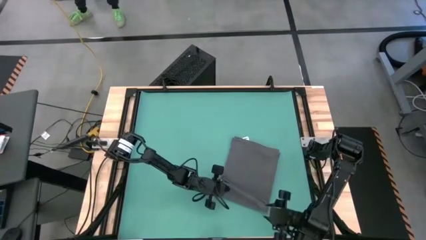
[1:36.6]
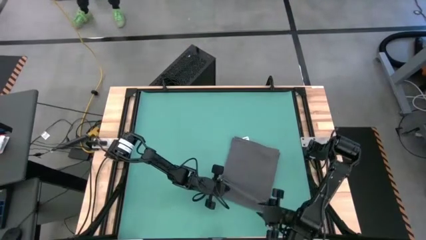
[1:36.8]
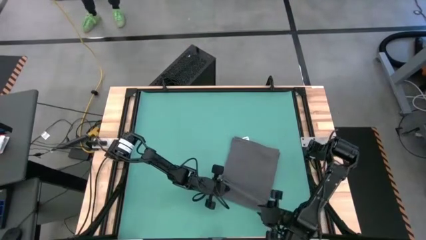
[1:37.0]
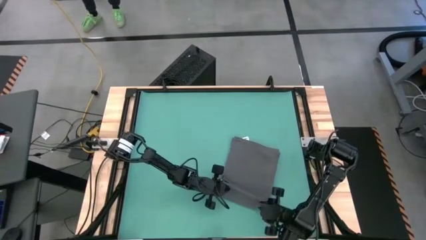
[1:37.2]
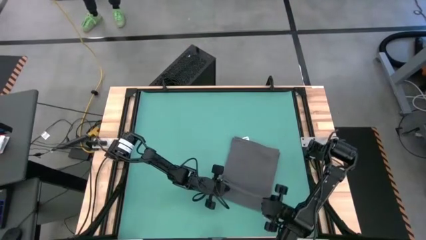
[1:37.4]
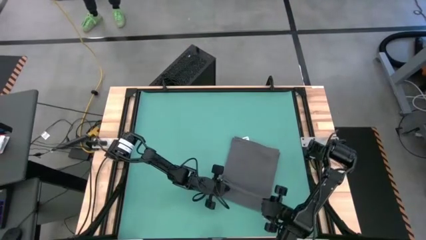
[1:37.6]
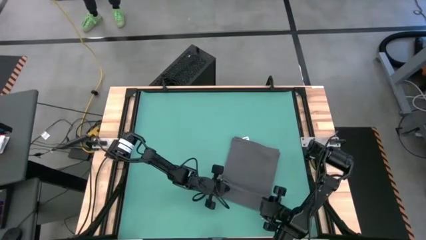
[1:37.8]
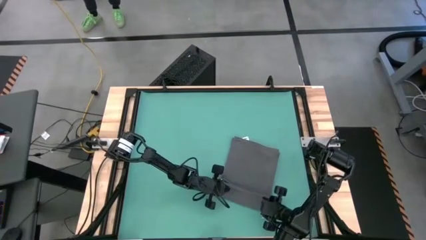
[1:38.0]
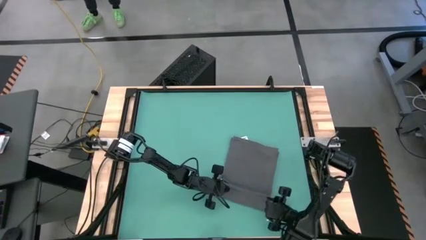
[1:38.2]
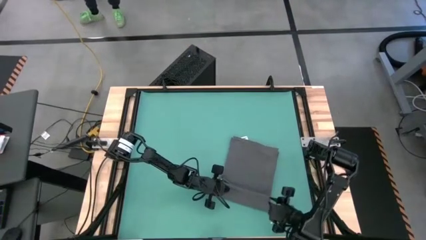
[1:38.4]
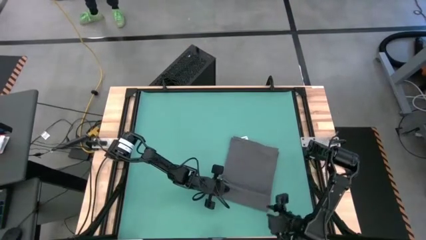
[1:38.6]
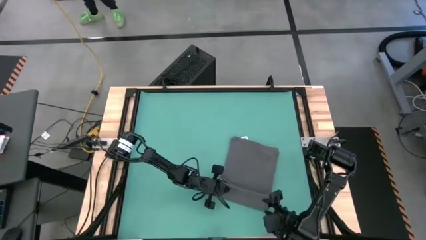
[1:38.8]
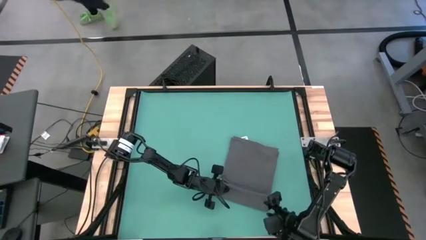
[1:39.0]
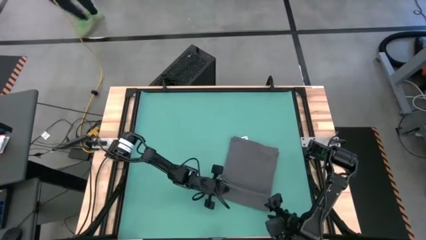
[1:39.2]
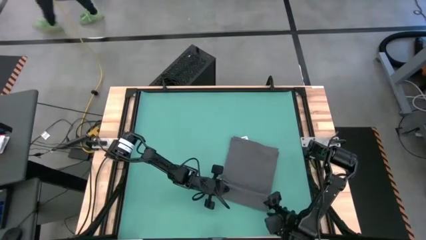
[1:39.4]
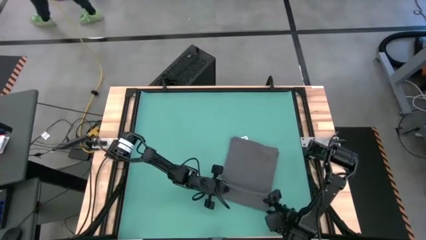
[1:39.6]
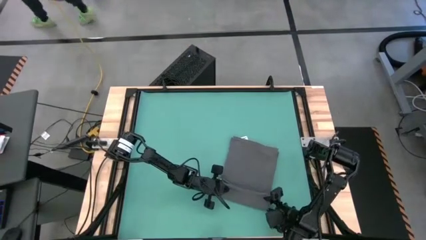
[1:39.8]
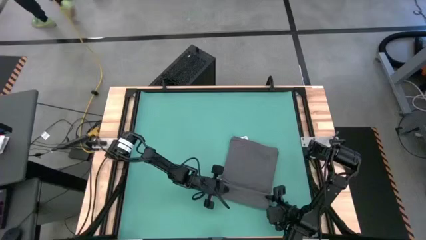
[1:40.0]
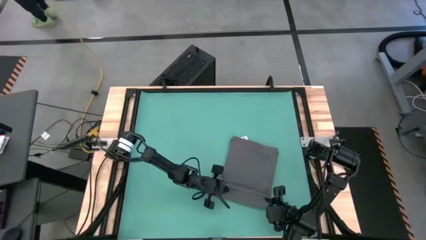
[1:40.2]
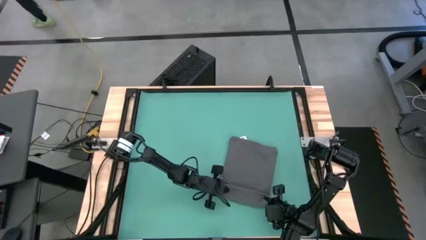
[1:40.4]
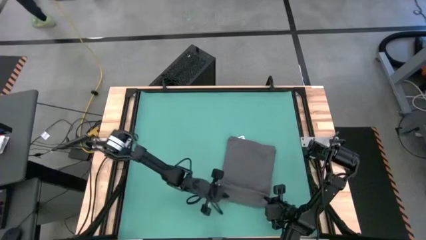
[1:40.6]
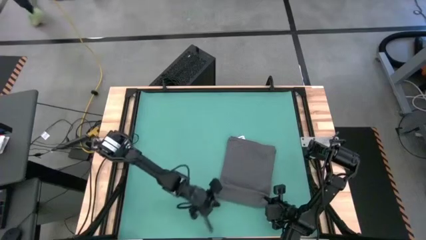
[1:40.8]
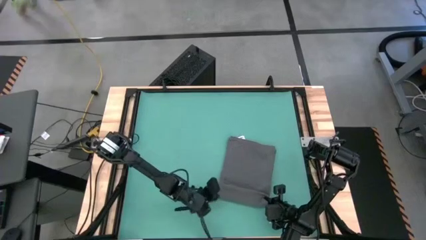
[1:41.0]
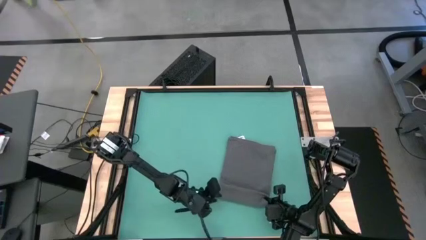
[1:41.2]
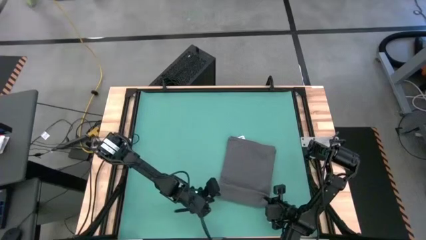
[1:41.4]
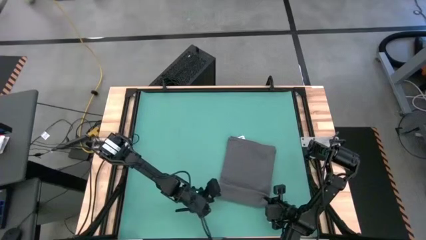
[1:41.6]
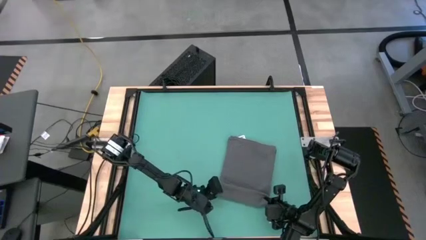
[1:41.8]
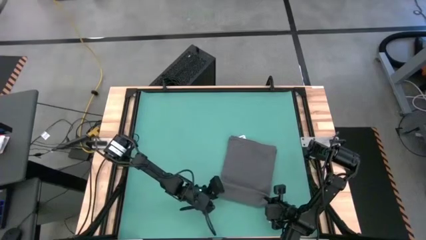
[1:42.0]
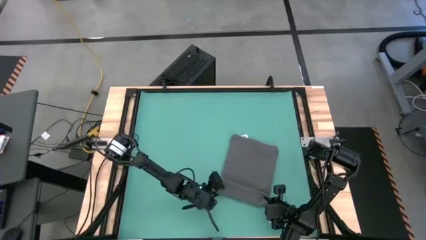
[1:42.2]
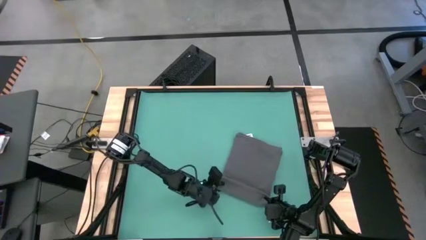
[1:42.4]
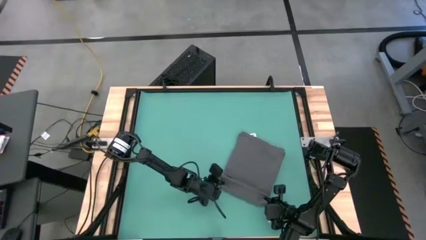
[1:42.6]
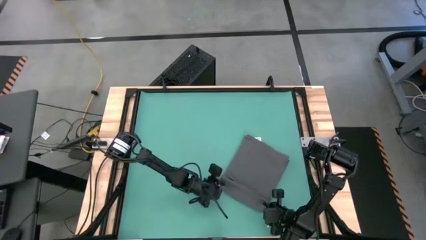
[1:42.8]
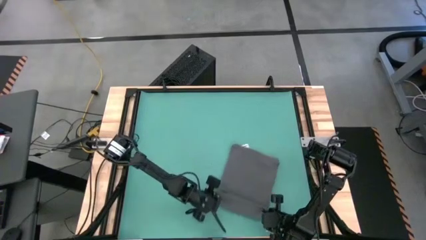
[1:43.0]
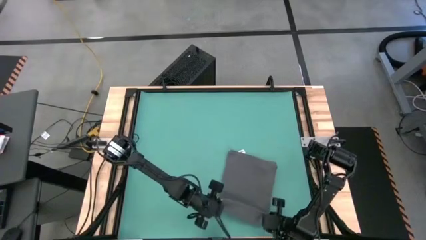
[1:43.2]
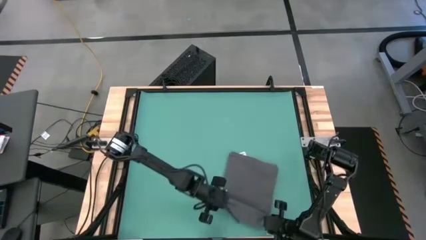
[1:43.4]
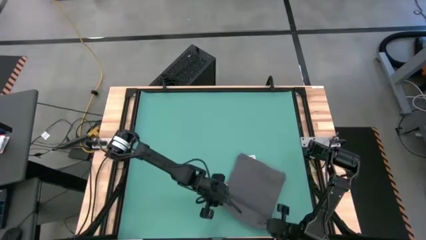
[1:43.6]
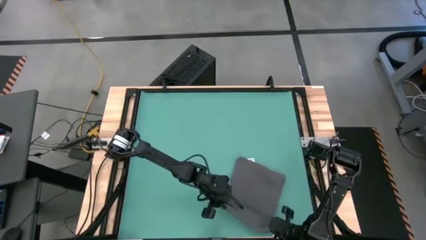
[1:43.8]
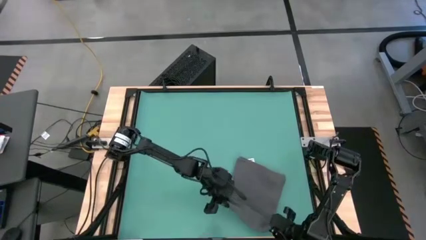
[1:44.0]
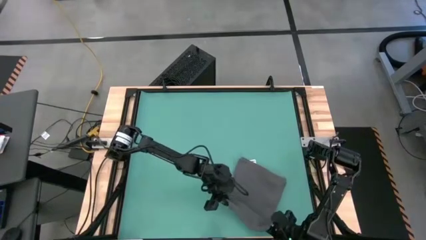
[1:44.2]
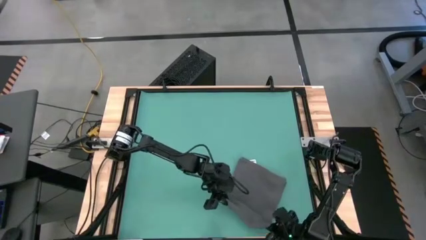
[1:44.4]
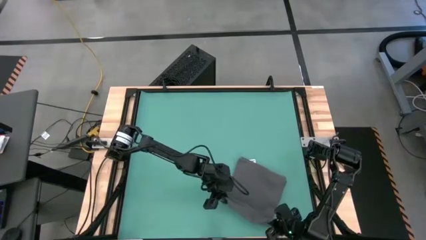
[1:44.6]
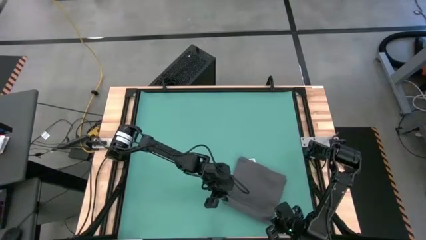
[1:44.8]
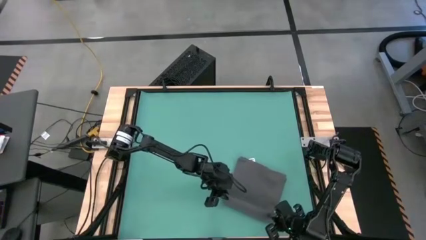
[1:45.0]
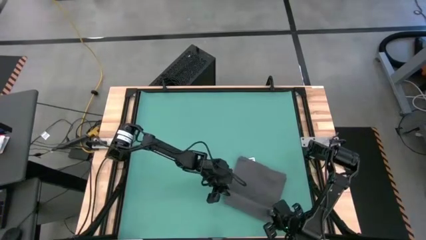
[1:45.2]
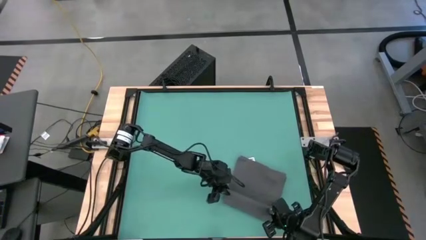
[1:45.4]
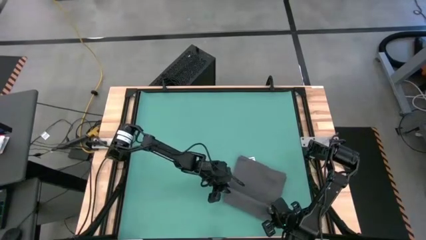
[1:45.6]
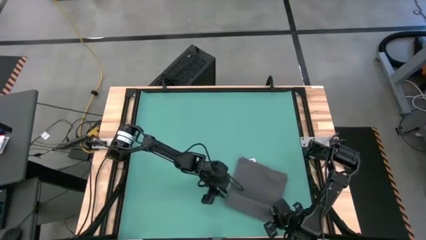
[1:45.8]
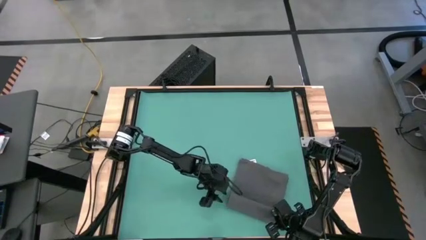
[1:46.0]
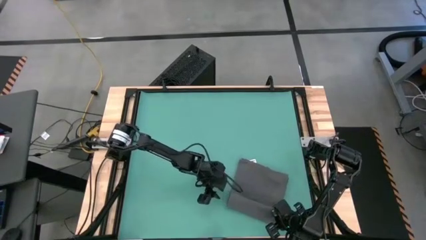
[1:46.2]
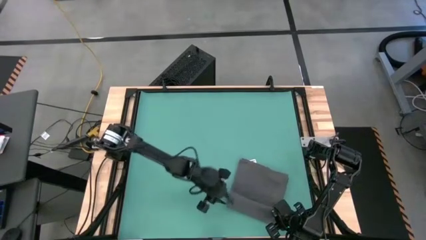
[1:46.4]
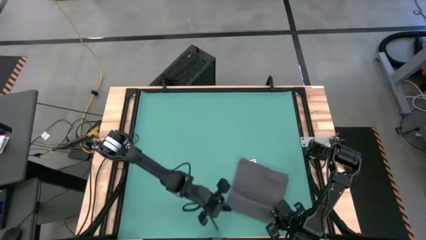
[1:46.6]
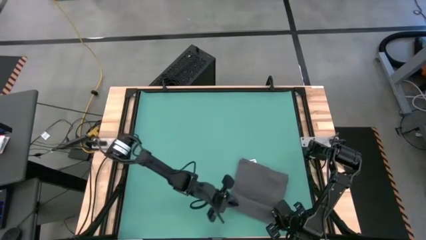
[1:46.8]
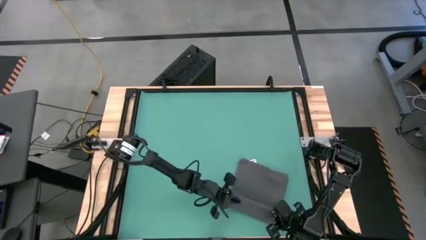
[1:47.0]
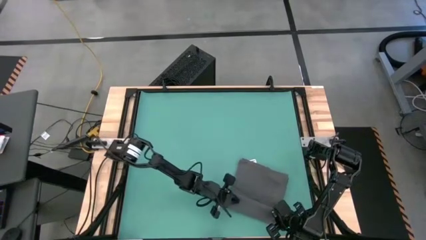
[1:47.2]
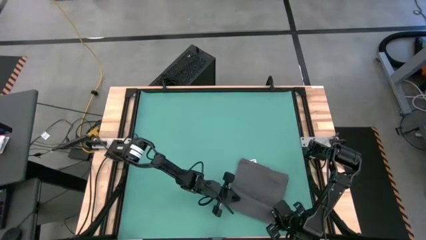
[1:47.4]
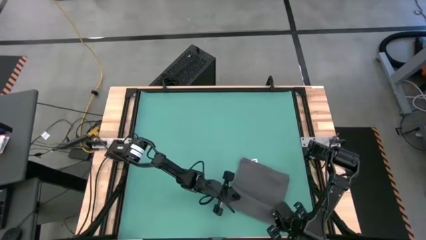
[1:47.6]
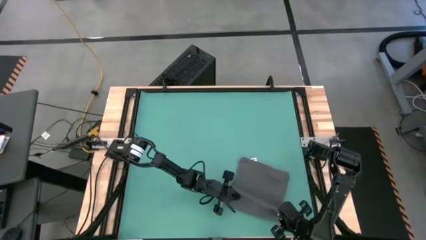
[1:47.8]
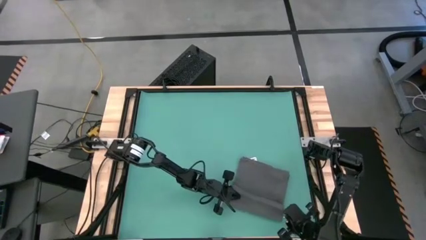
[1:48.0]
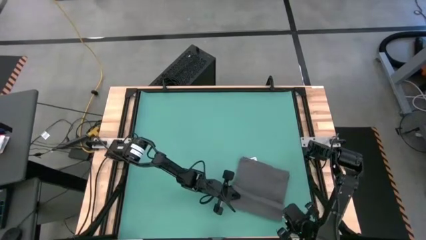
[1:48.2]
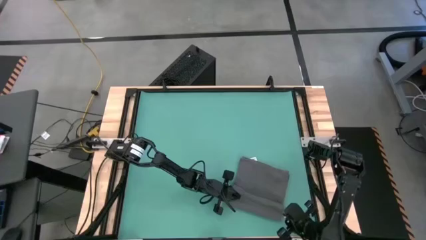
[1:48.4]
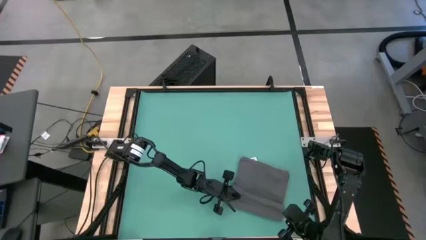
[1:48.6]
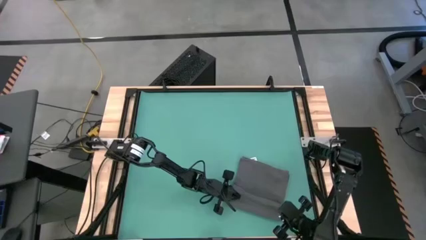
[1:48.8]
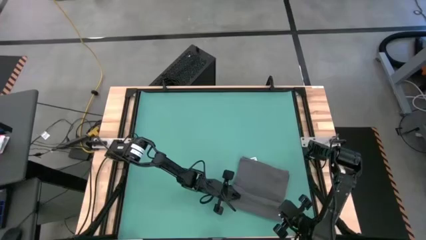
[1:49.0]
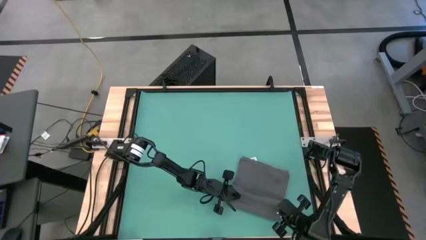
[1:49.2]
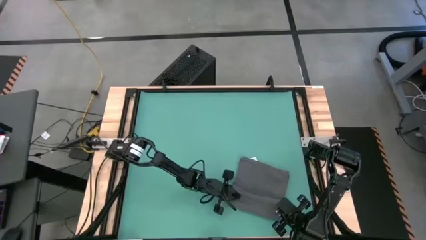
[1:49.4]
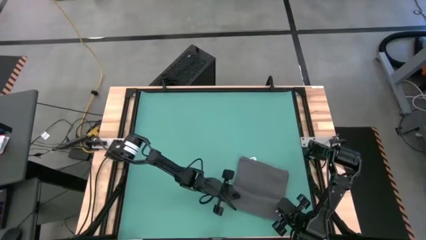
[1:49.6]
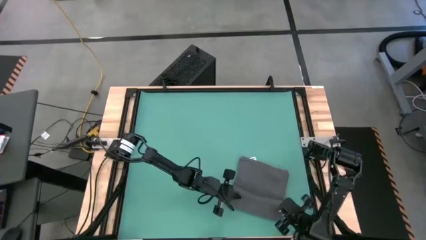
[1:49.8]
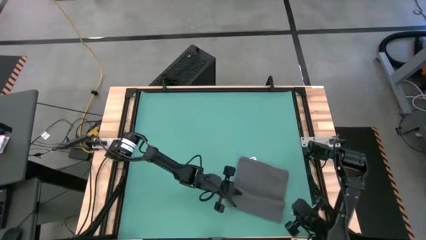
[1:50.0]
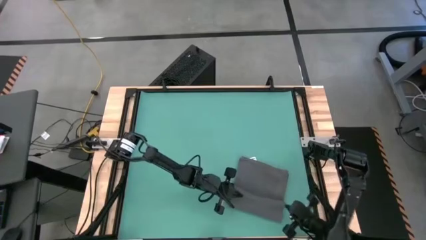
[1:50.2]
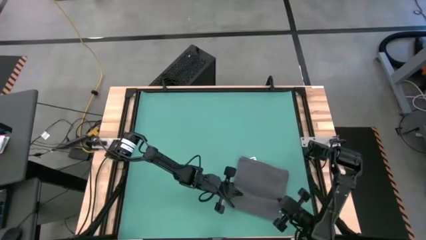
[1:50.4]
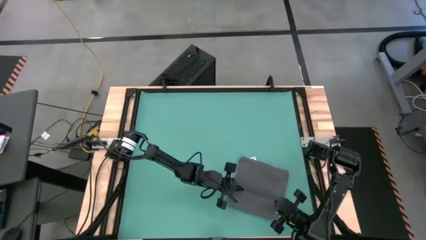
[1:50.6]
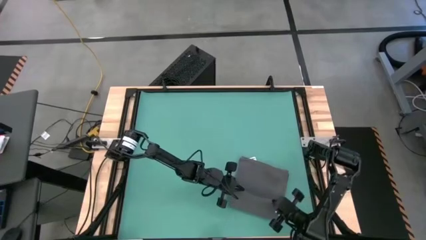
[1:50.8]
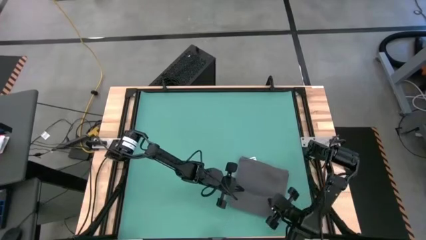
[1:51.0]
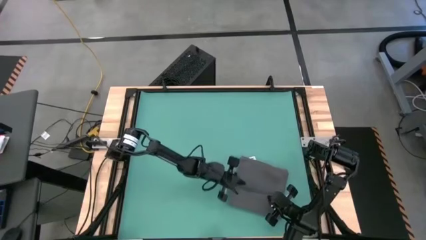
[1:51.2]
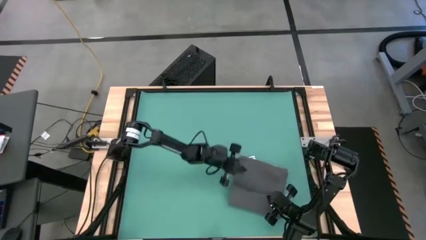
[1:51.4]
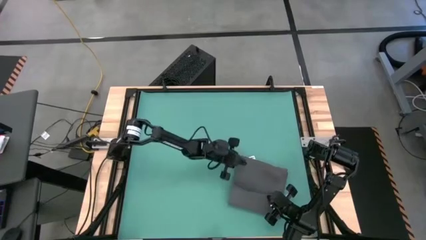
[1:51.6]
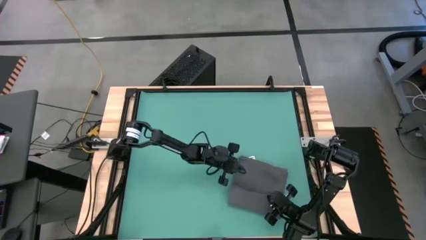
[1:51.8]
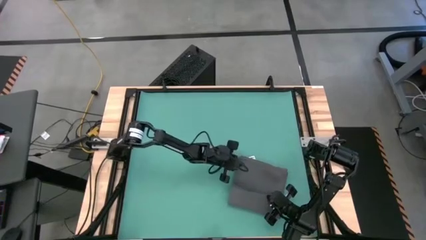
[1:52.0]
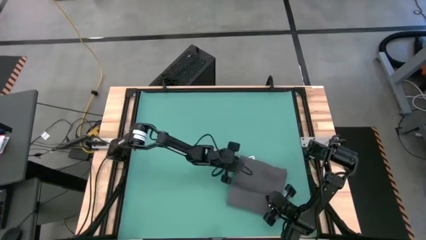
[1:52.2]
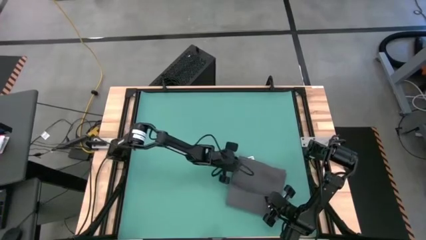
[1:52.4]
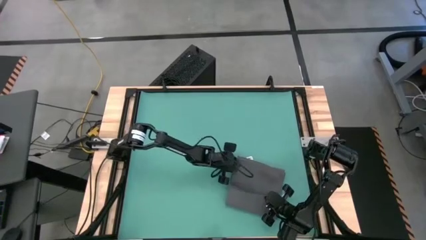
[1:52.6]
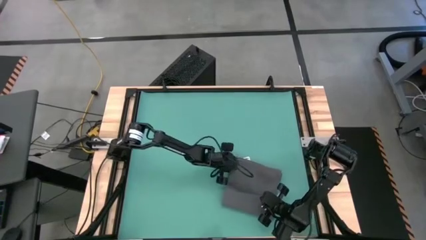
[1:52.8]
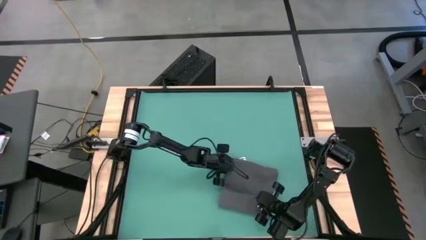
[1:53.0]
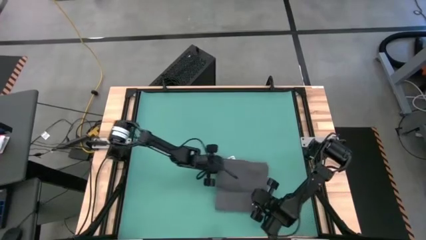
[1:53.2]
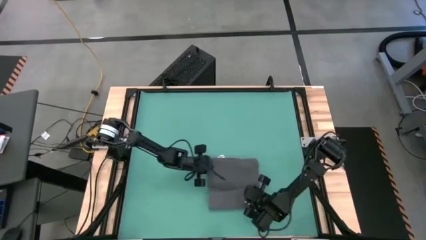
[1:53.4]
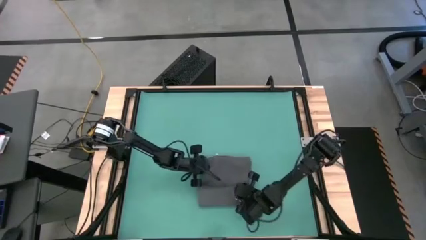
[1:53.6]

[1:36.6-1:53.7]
Task: Roll towel
Roll the gray towel
